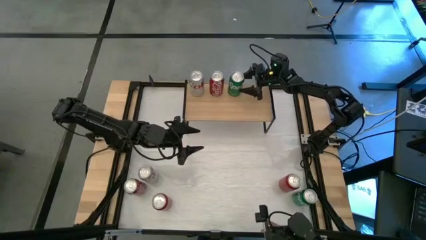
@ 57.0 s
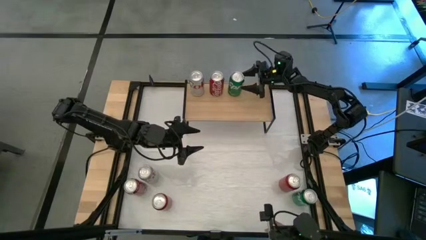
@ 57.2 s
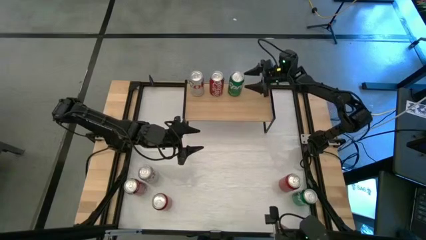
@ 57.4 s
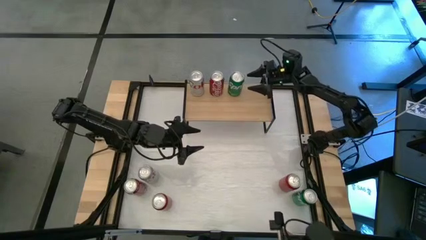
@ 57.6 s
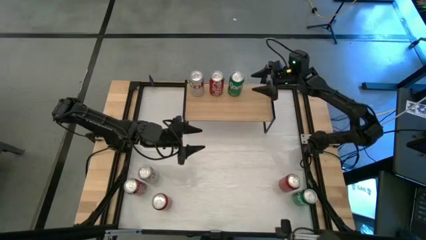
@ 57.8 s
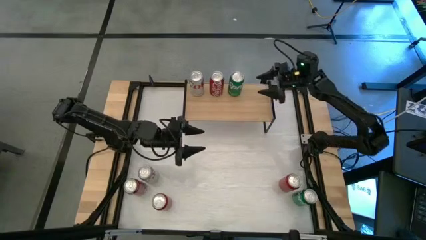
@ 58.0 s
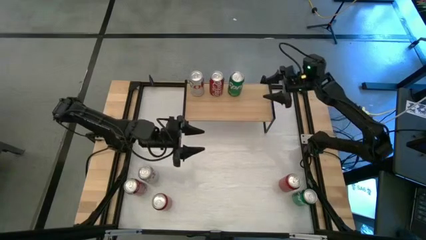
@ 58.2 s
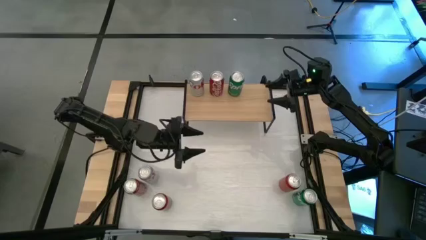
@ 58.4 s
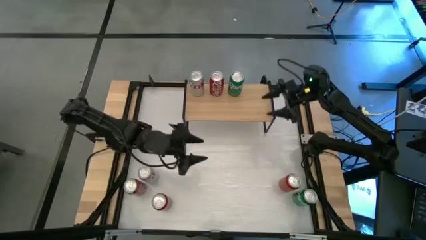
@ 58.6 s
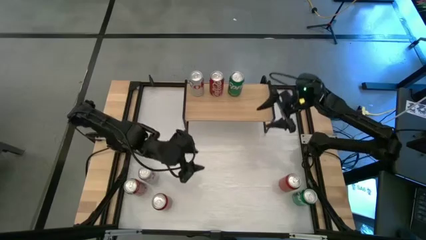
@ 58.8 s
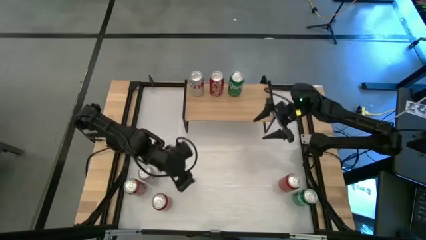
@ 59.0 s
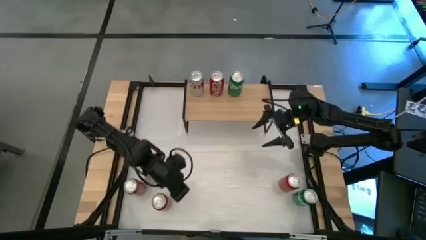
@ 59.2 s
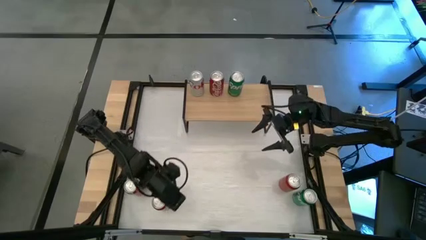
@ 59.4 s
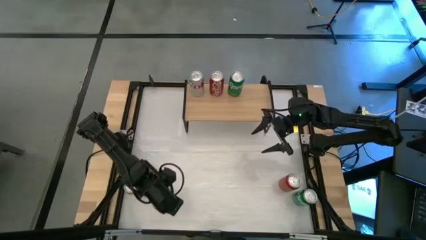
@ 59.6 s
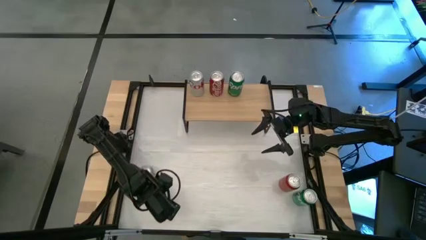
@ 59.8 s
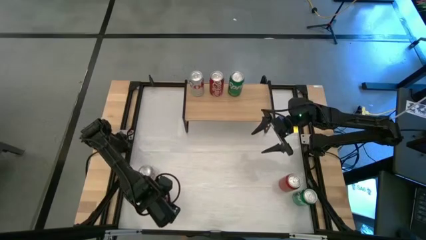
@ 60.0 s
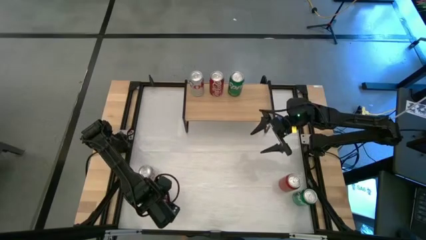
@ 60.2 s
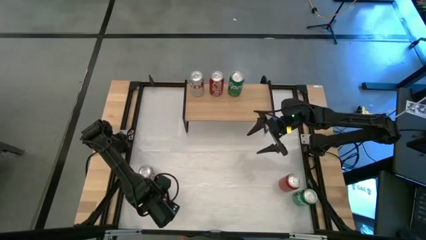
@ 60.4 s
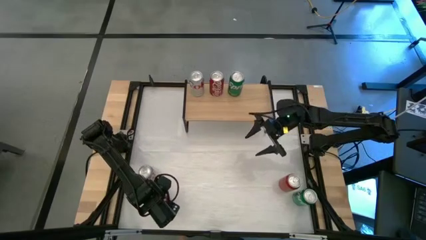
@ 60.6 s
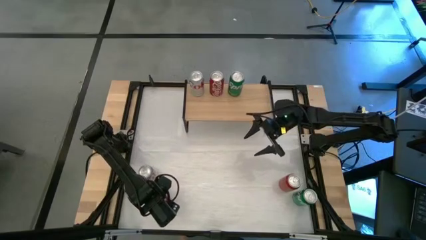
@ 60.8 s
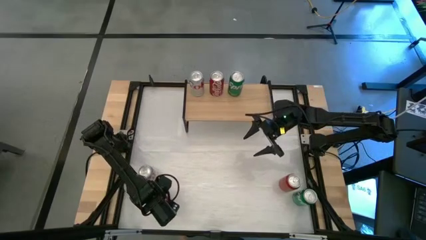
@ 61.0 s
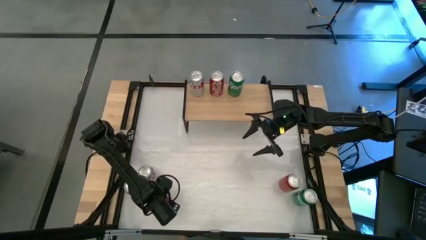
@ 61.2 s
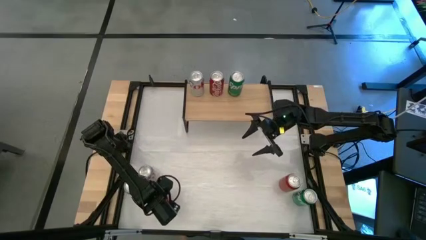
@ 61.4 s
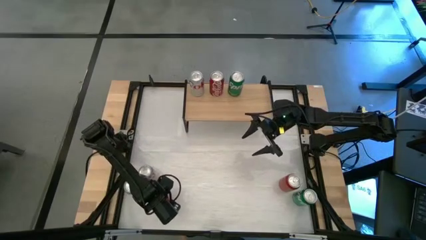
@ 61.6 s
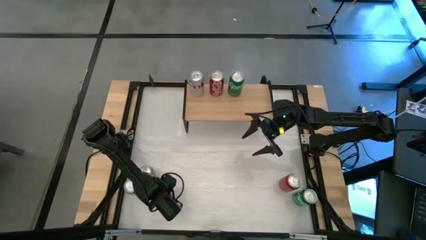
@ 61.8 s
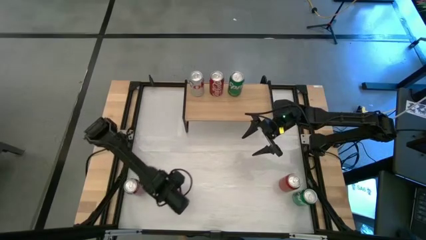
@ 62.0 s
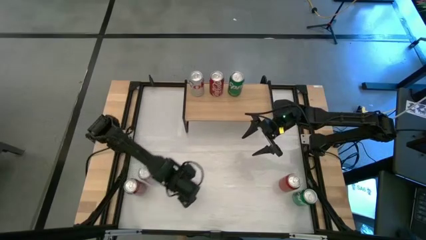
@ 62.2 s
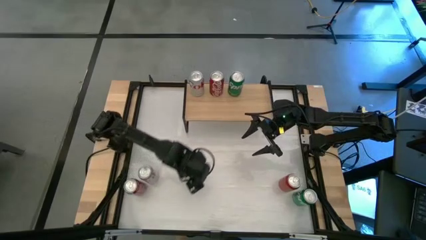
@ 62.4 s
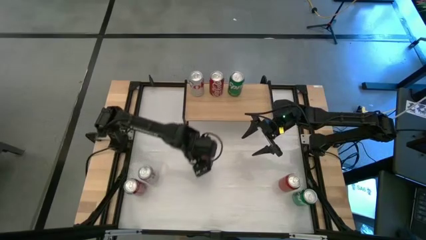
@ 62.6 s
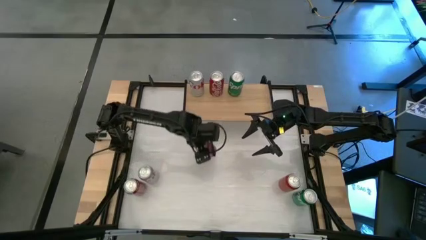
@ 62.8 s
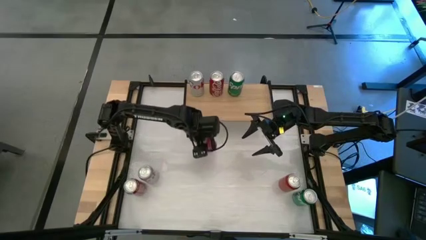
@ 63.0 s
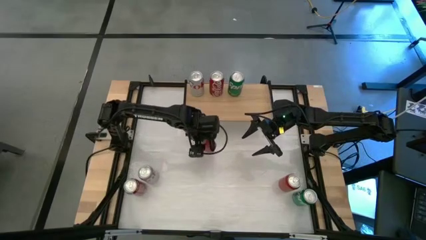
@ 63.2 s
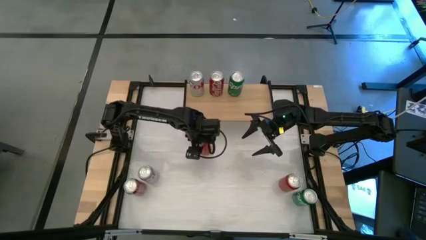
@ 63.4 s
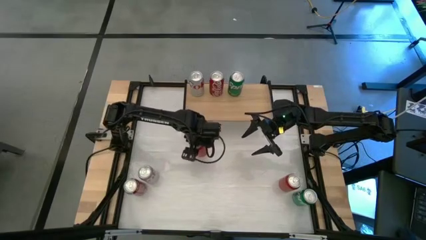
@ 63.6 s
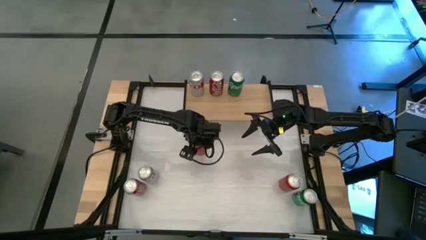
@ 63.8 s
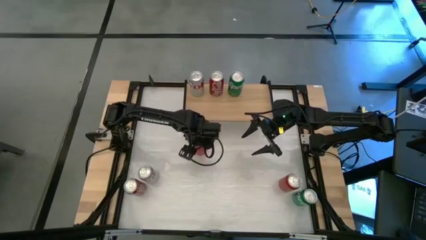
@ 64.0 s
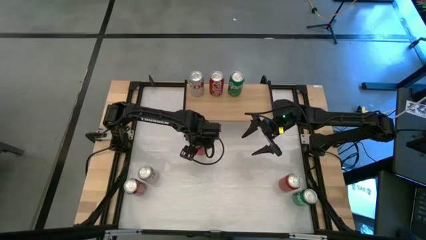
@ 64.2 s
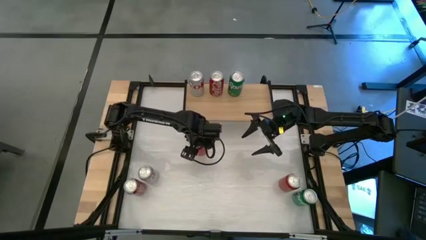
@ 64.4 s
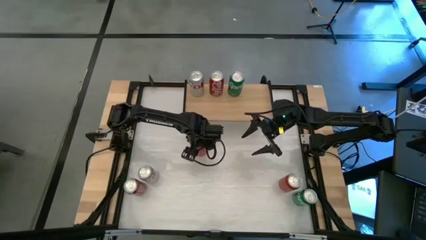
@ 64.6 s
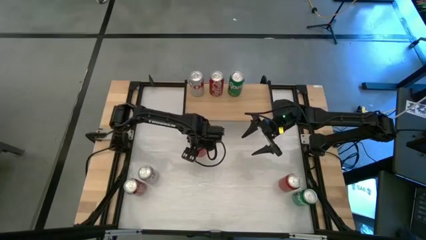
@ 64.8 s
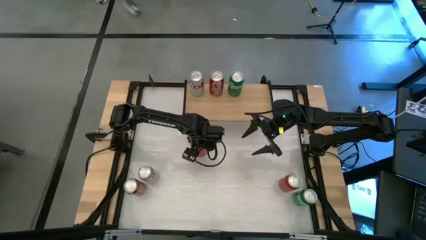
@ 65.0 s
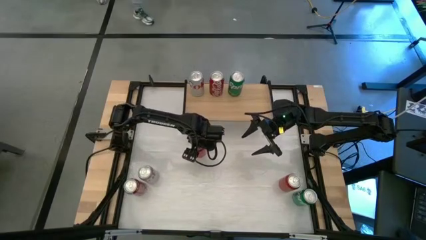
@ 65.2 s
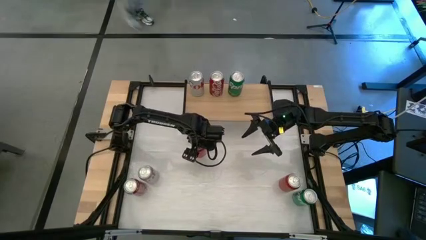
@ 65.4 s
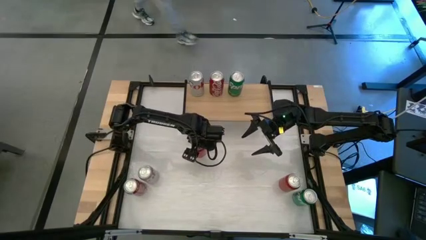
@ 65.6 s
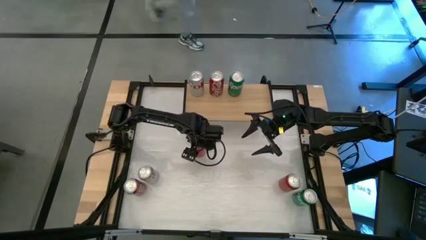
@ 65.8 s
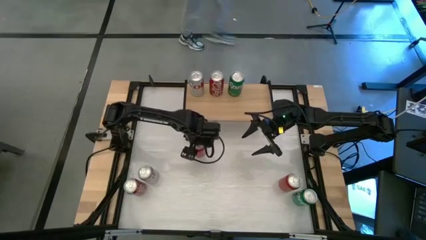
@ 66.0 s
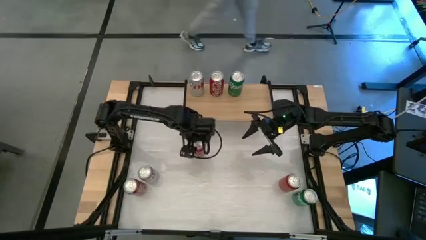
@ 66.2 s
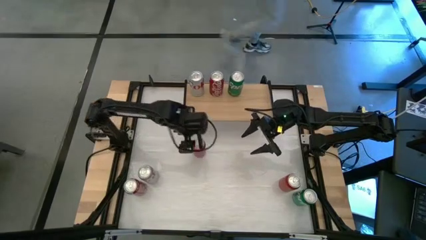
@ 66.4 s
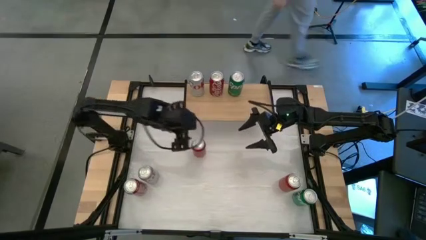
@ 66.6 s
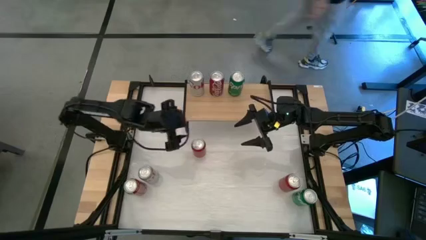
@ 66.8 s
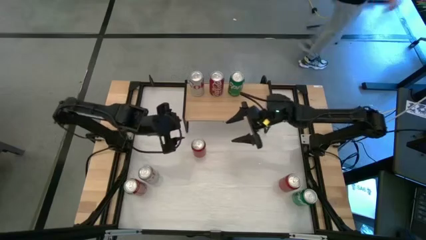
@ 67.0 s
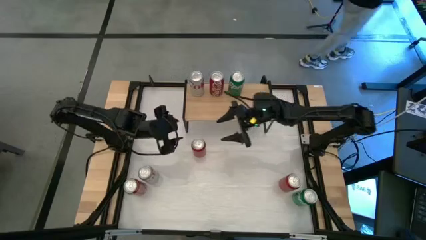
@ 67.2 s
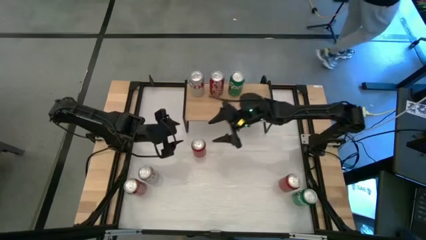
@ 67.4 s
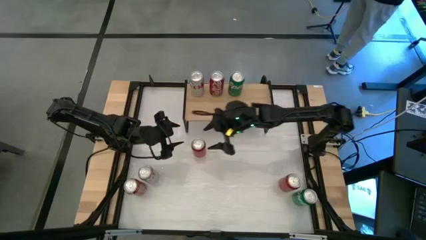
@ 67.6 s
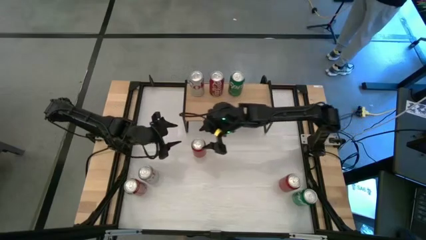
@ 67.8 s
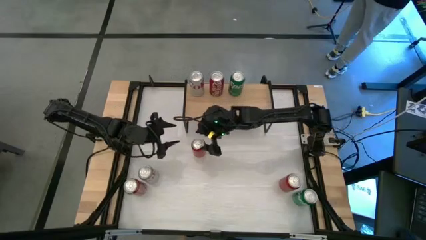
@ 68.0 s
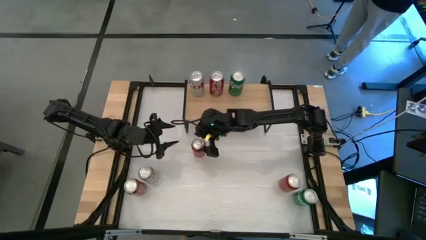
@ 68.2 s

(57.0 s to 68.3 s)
Task: Place canned beverage on shelf
Put the left red-black soda can on the shelf

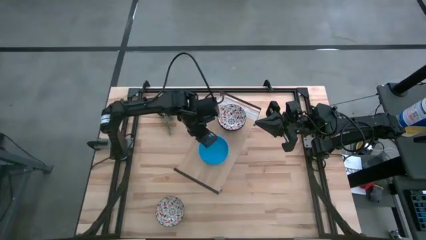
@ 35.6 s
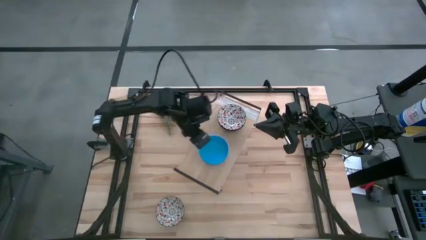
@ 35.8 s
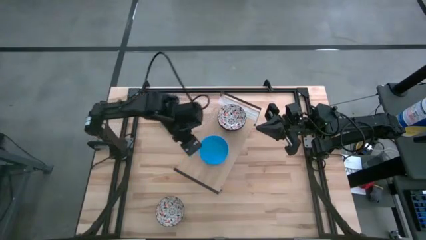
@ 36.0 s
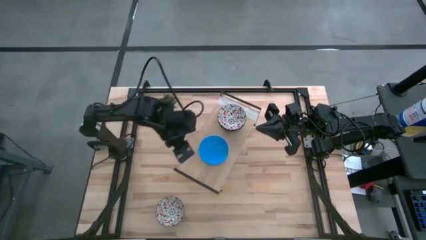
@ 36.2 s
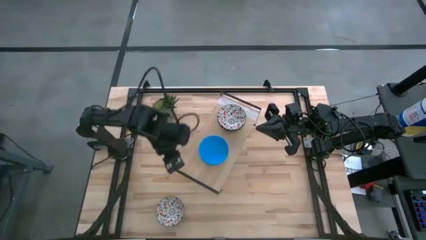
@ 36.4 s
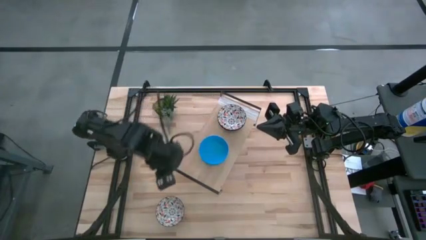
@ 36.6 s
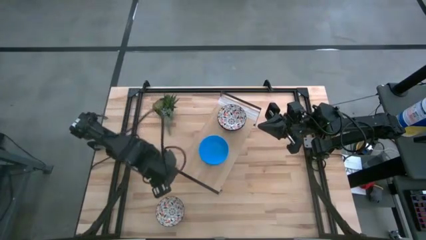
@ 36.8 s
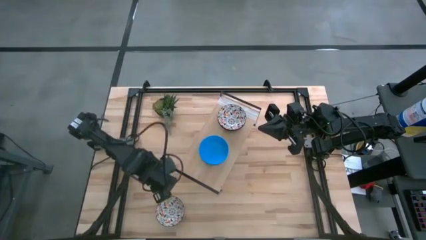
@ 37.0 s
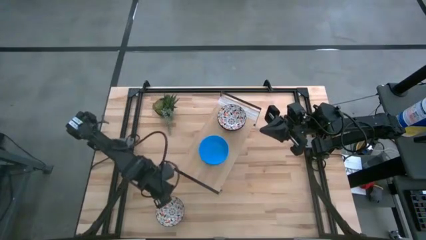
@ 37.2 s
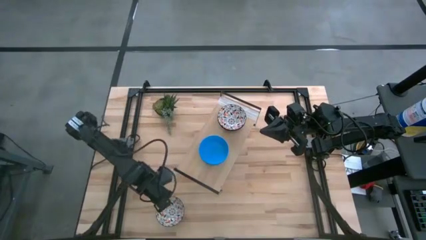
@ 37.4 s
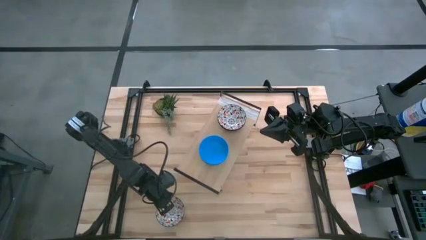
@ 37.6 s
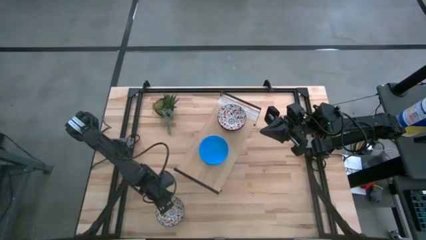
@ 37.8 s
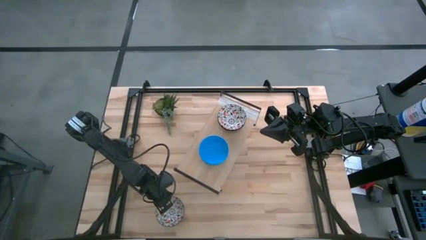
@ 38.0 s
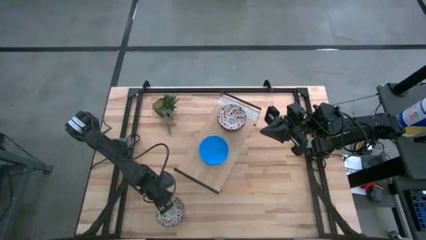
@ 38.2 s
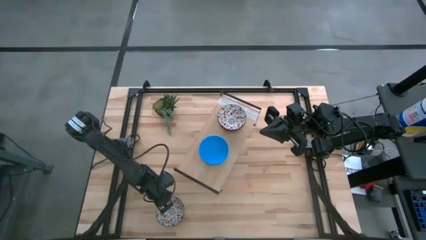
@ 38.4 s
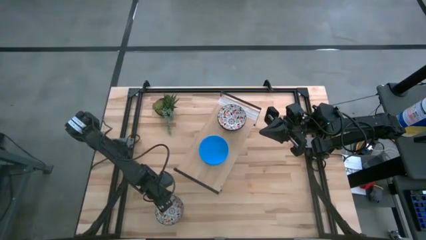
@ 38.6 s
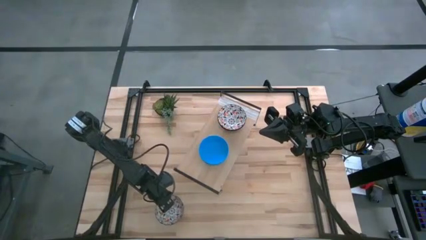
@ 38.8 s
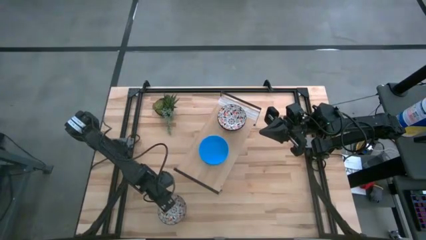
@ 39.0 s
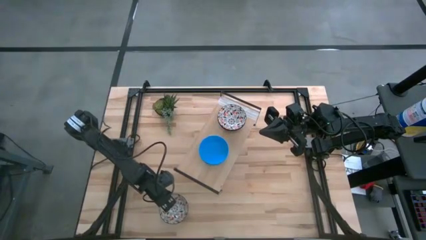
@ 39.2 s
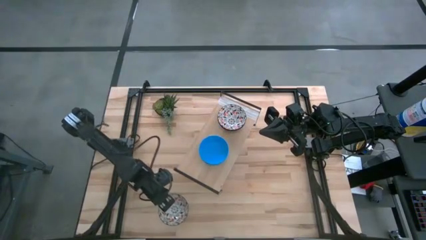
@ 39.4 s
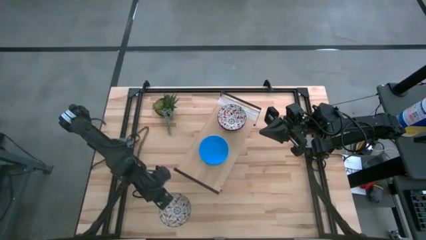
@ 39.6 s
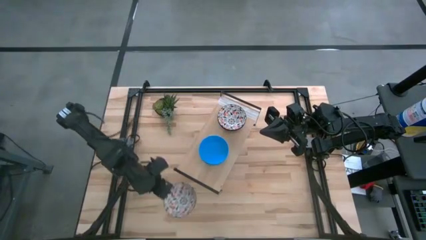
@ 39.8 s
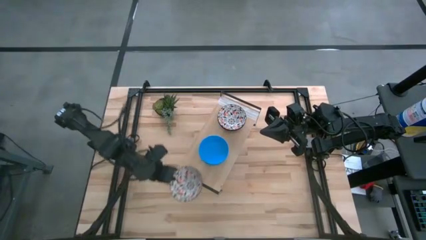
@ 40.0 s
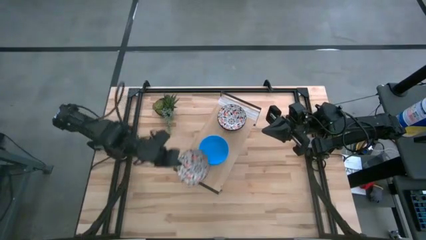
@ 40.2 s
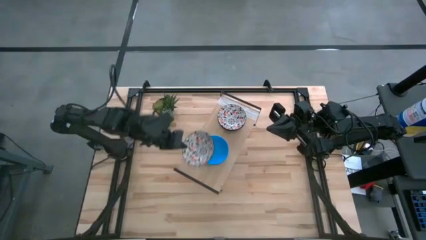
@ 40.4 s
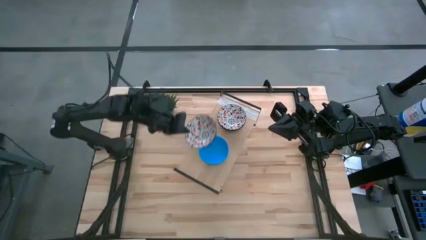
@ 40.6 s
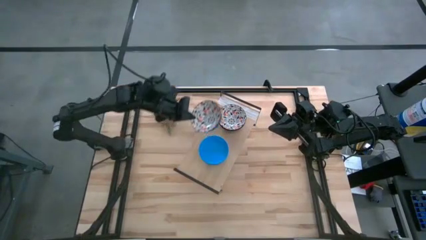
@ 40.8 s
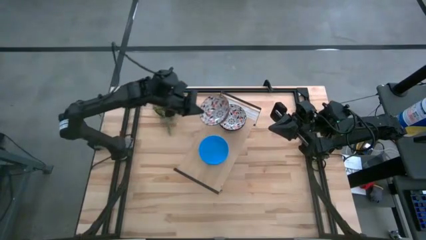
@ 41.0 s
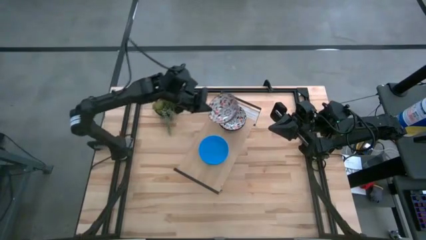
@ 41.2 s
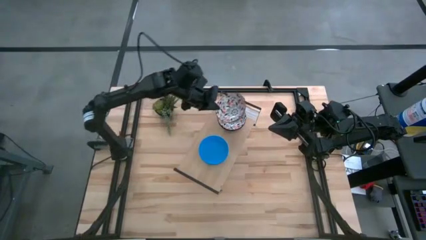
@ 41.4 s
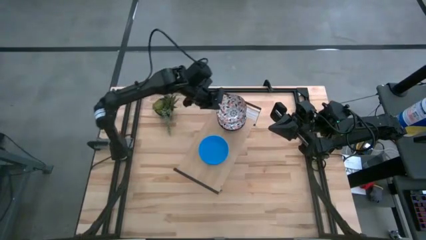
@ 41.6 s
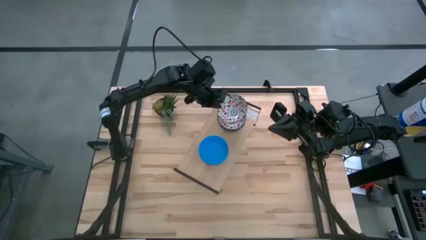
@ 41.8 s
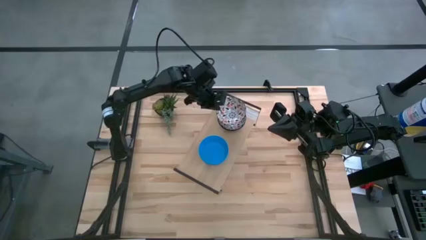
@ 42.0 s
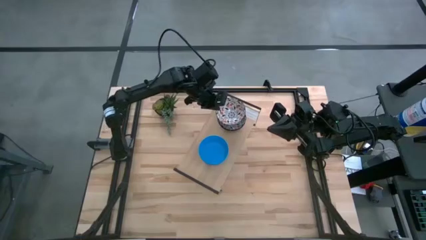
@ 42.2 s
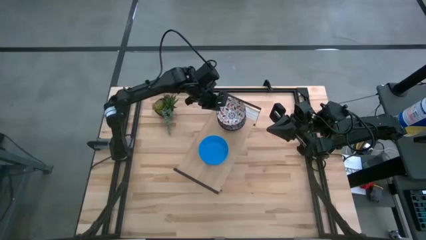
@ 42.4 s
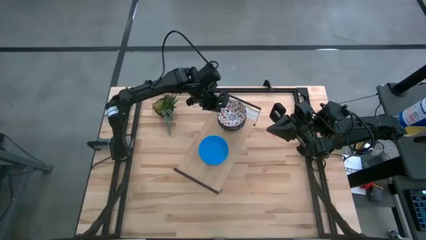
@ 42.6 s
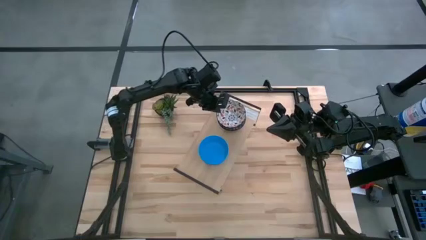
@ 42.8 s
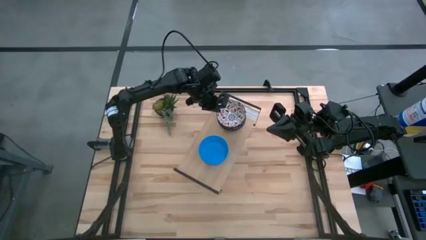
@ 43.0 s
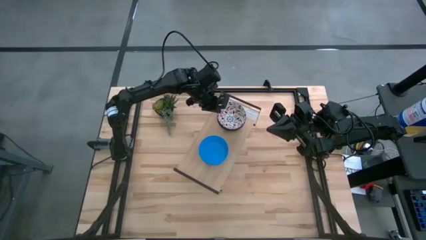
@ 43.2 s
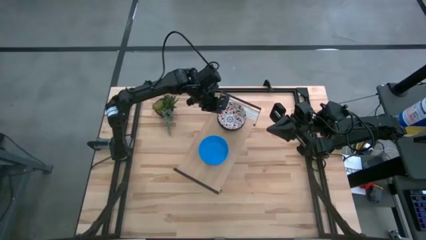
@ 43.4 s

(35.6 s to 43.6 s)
Task: Pick & Place Mini bowls
Stack the white patterned bowl on the white patterned bowl on the shelf
